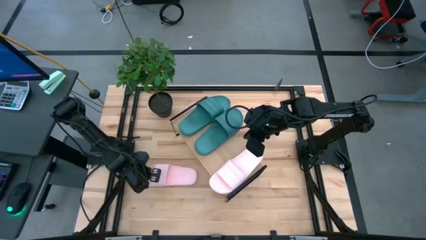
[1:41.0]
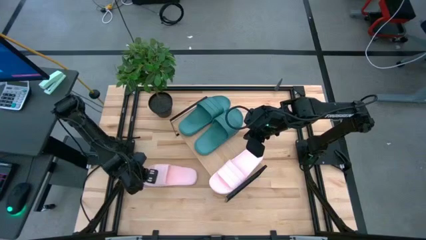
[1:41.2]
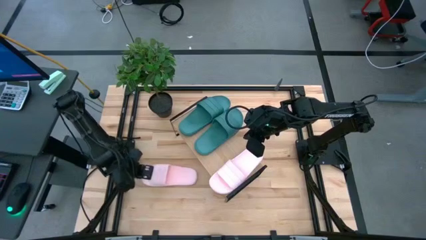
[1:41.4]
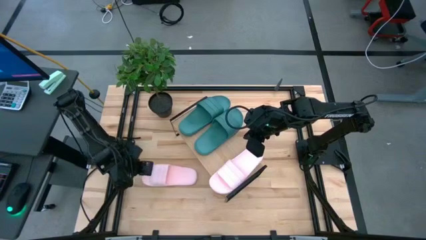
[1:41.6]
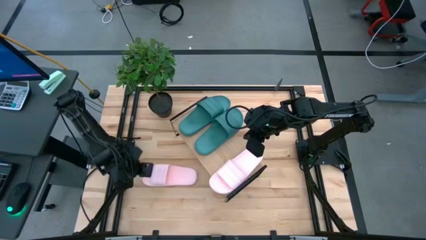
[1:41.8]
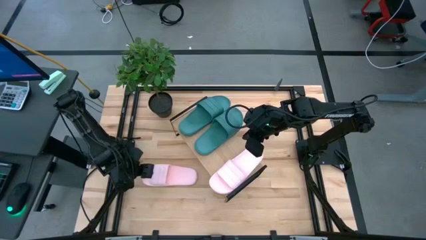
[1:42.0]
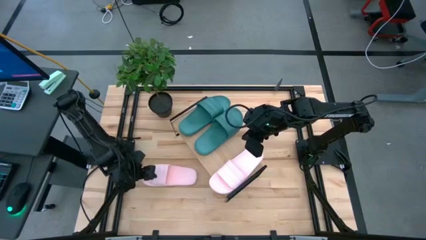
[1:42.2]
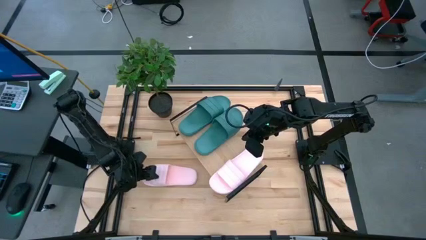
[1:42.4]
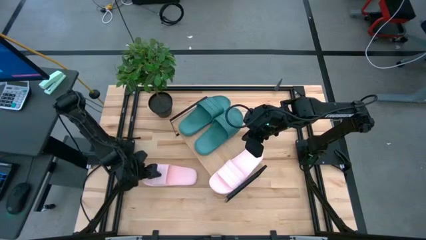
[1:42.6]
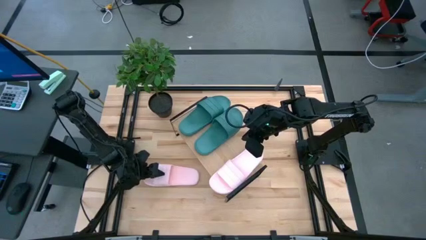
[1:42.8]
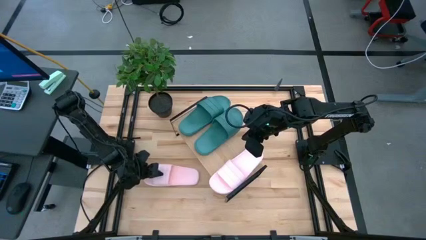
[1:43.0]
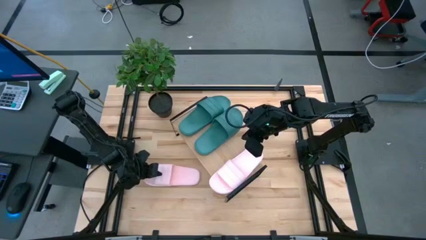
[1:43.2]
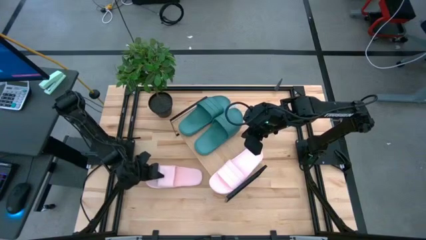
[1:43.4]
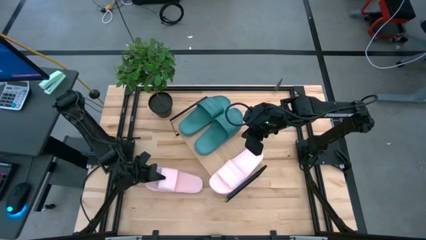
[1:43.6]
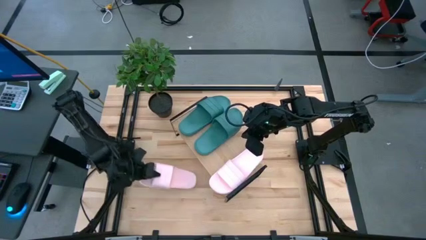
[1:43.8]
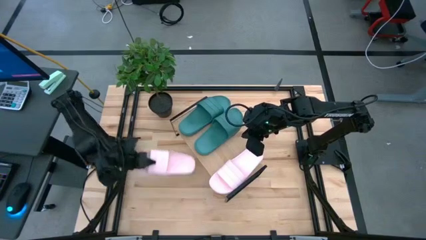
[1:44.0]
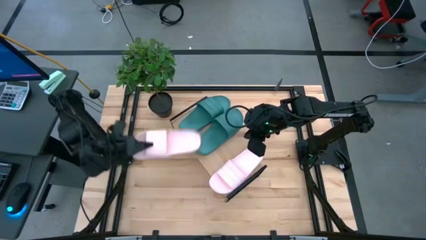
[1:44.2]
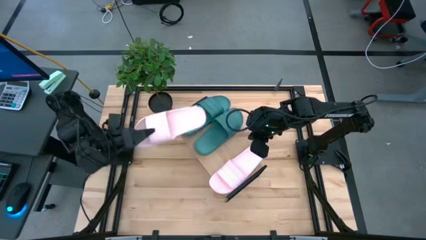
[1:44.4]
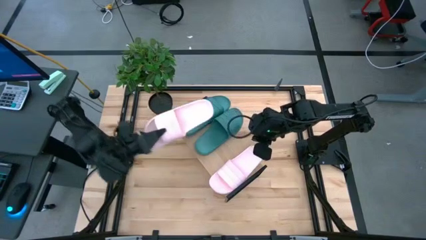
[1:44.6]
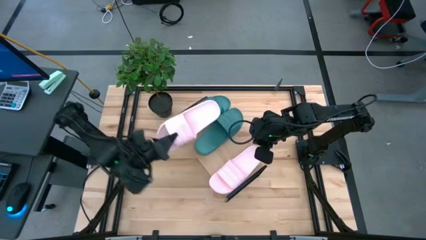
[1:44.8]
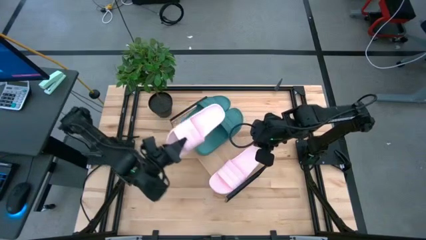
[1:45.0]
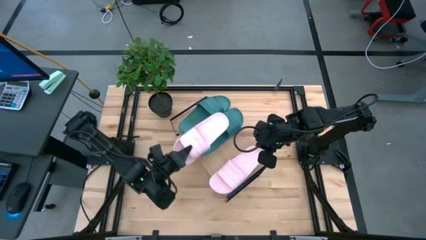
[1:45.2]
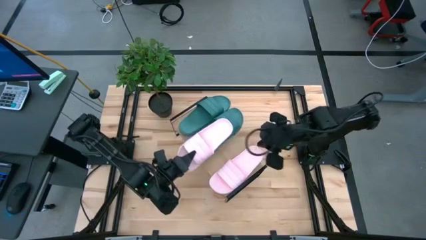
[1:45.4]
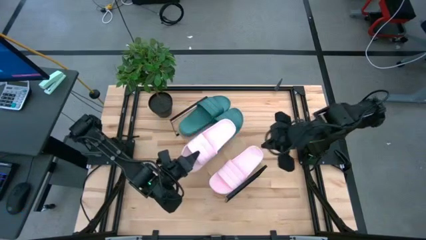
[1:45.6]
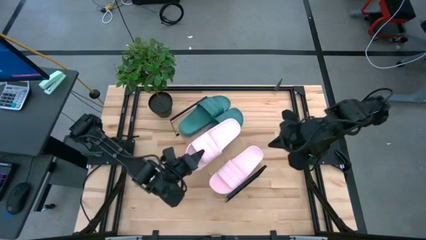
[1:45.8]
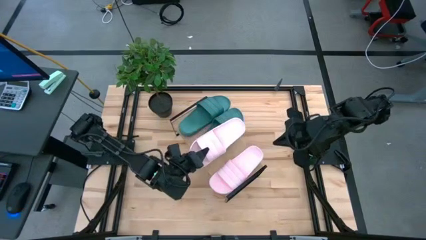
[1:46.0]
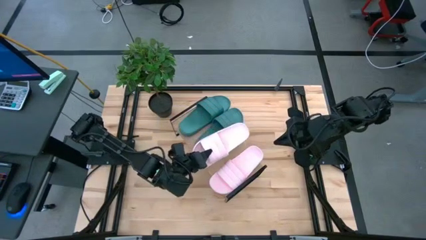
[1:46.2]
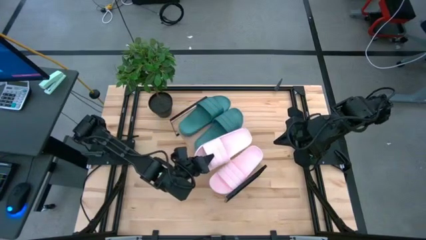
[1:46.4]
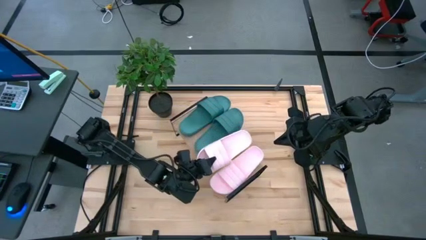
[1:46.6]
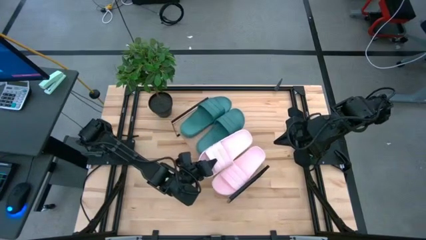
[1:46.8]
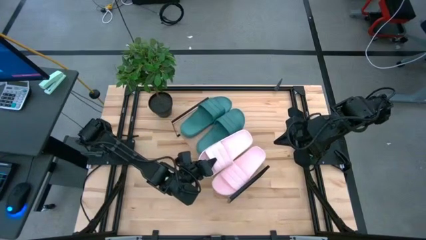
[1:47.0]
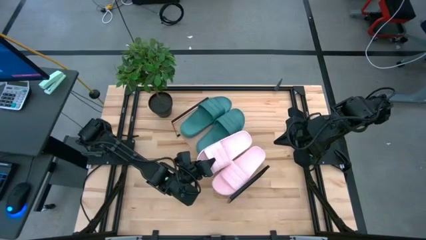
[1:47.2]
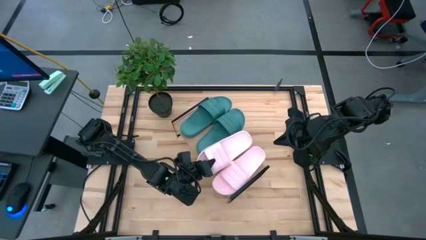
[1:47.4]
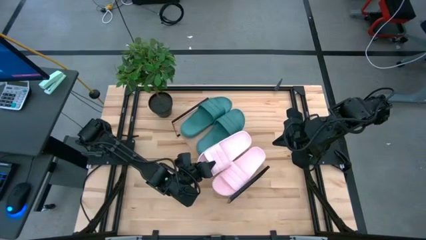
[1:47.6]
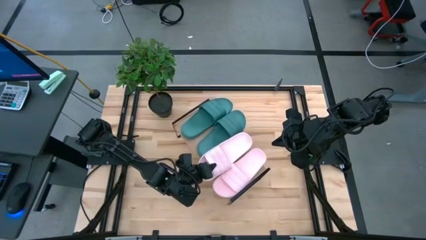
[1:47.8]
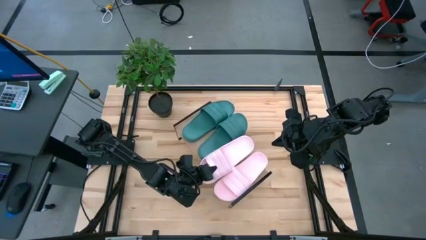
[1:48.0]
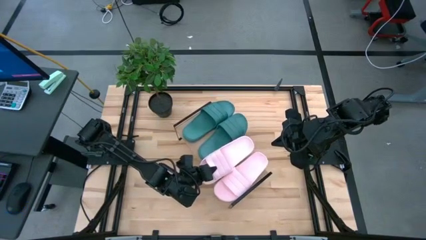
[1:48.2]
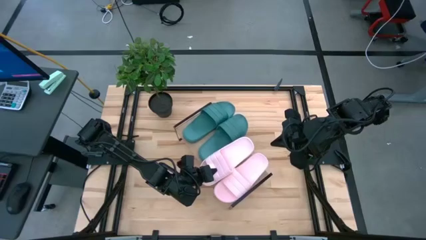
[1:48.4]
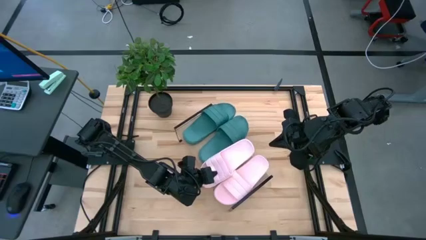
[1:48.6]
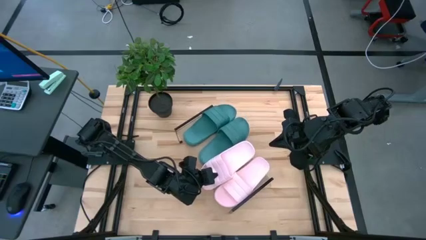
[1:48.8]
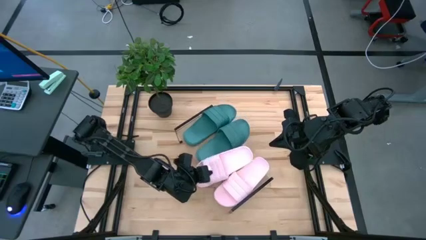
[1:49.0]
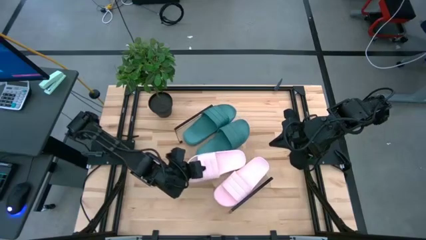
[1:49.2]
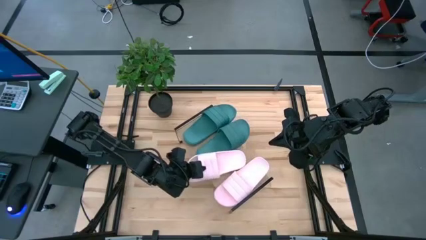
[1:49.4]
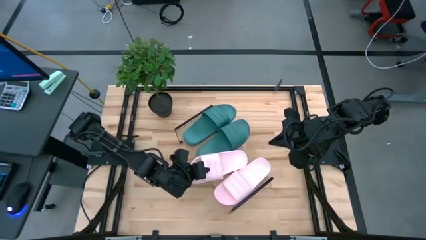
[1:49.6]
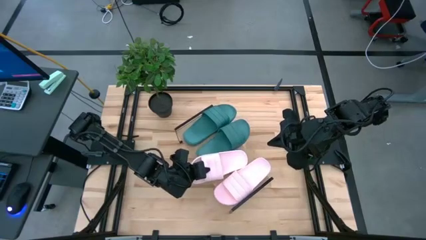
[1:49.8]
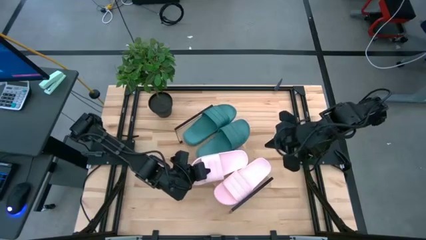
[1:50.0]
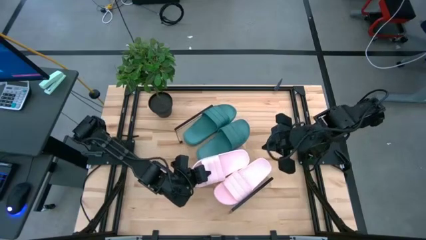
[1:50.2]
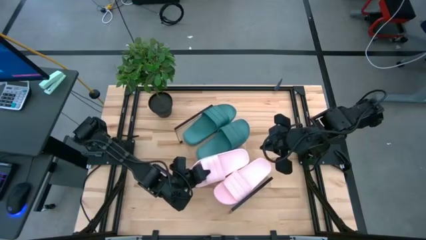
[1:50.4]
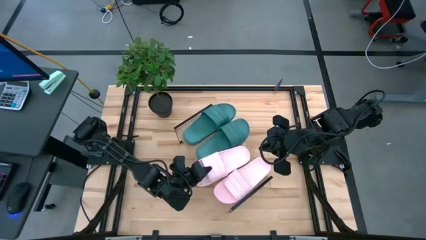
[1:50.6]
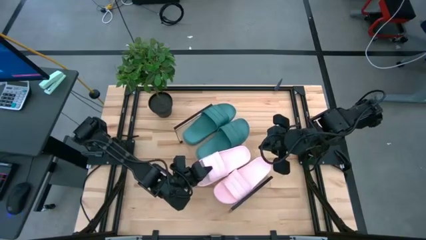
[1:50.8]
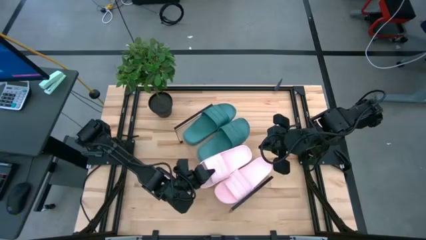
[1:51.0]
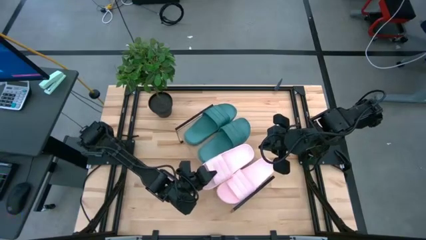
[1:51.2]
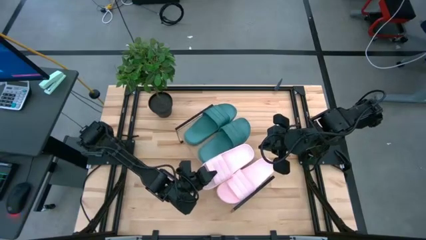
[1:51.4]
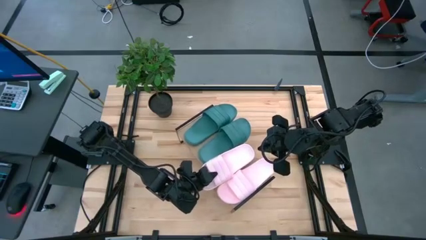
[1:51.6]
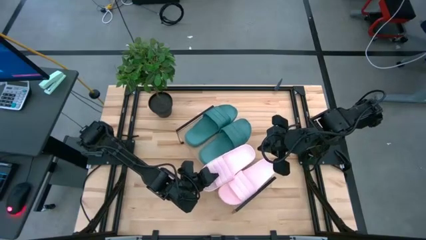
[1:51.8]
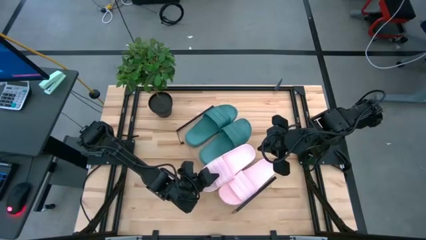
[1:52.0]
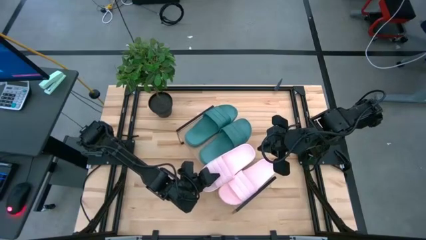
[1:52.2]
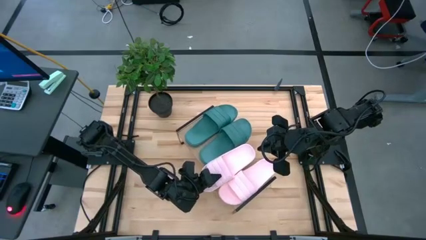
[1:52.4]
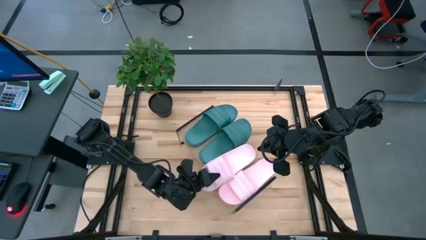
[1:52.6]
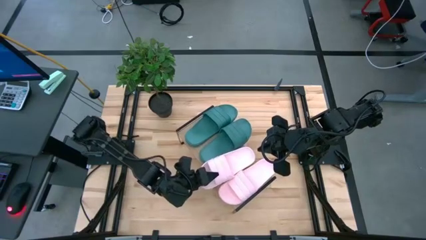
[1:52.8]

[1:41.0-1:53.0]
Task: Pick and place slides into the shelf
Put the pink slide slipper on the shelf

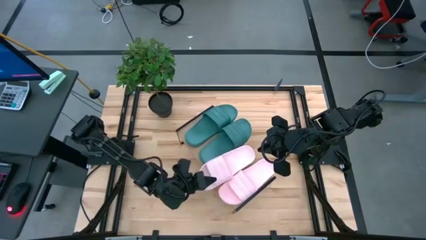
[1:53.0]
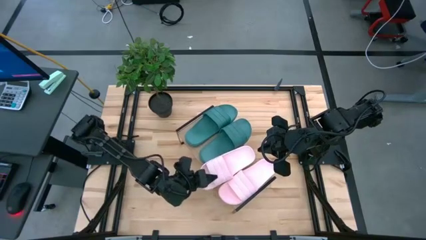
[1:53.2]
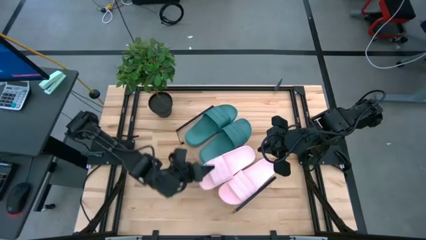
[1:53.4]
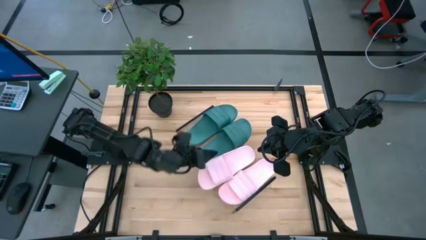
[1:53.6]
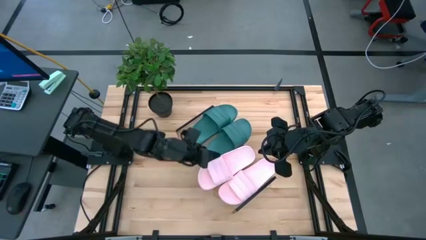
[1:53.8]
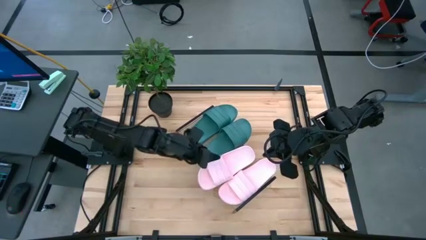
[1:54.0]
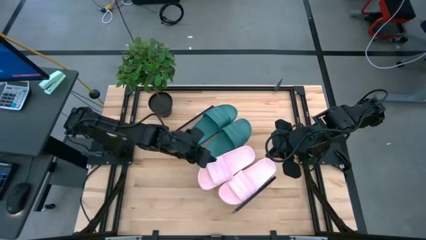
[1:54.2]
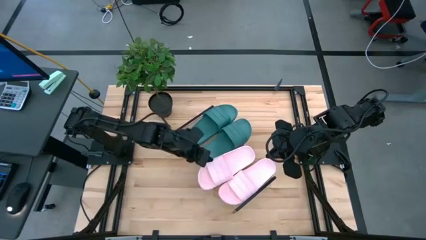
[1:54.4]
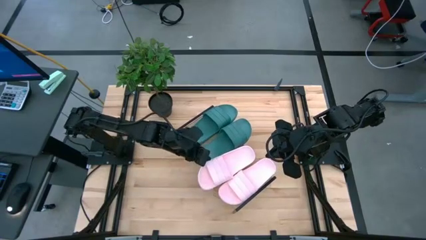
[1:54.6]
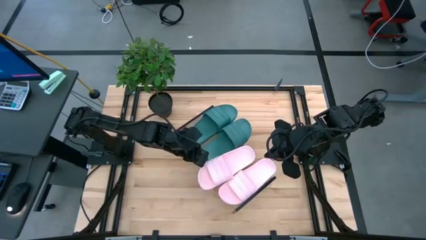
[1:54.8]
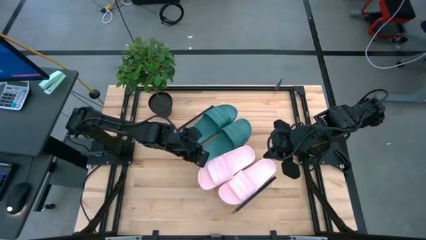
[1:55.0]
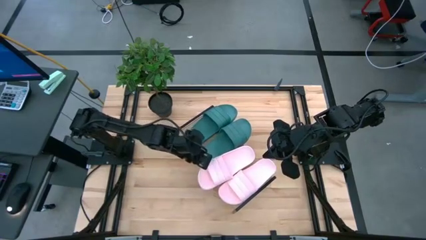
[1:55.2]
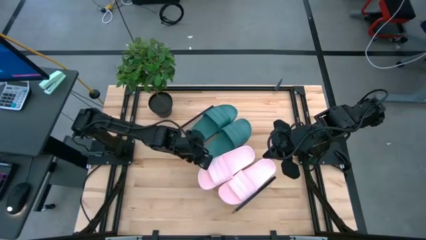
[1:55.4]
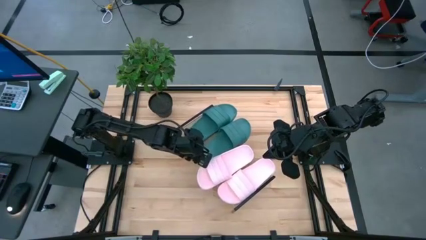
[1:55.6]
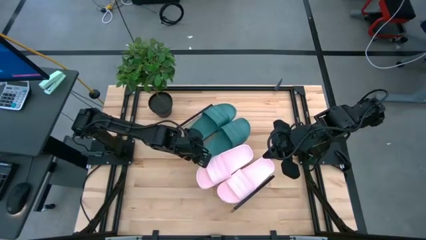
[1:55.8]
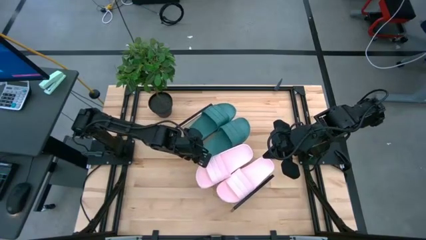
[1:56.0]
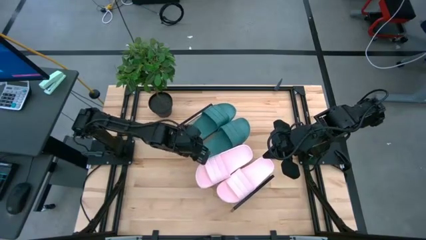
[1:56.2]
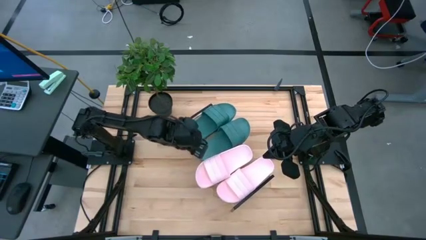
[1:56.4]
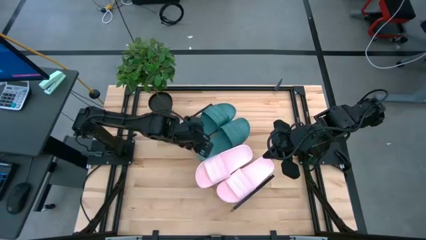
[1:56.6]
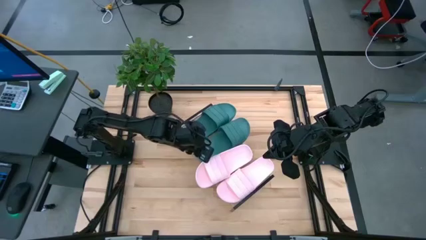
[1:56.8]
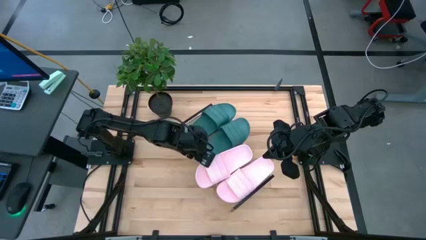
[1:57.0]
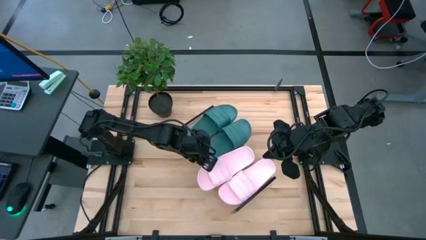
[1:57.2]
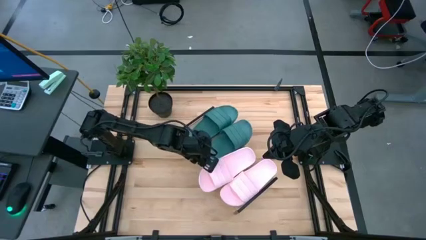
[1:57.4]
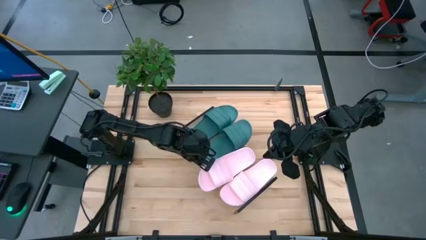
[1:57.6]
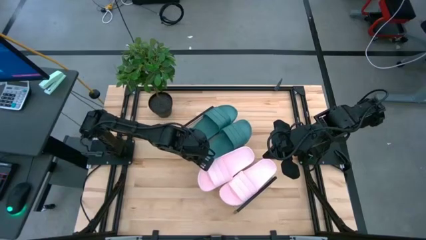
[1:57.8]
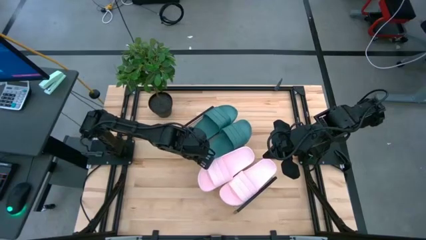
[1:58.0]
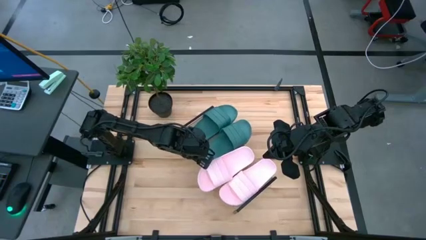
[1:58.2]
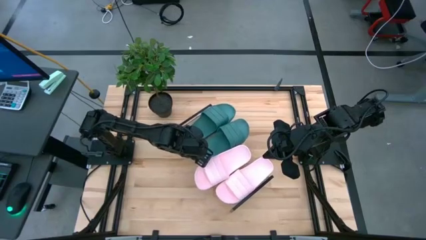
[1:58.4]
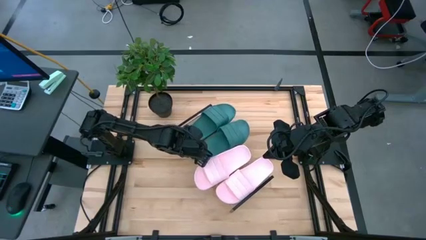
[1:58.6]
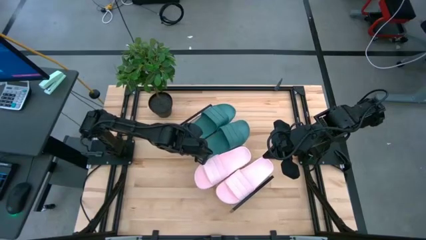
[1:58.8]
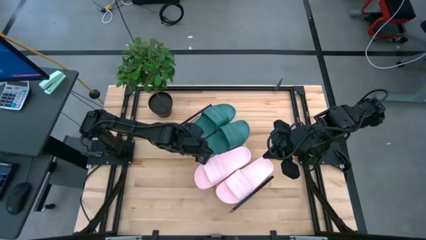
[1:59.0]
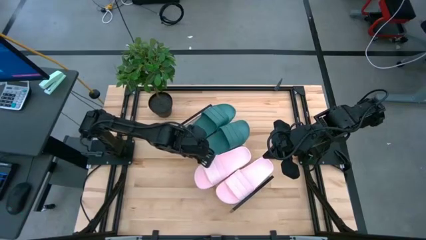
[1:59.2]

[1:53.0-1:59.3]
Adjust the green slide
